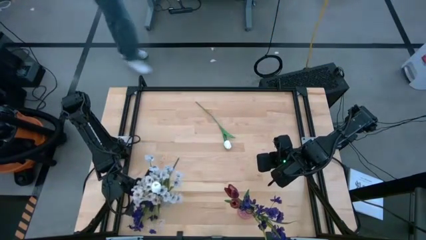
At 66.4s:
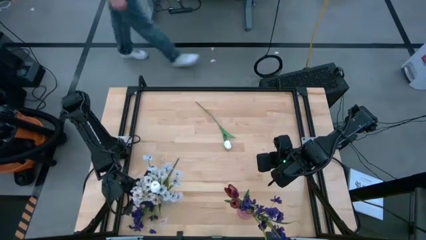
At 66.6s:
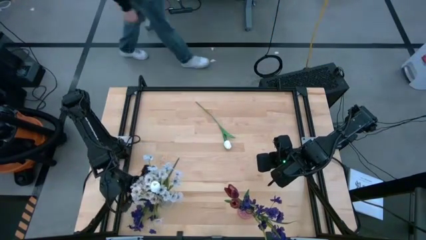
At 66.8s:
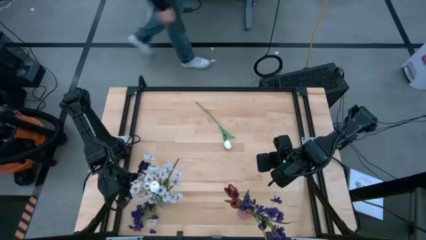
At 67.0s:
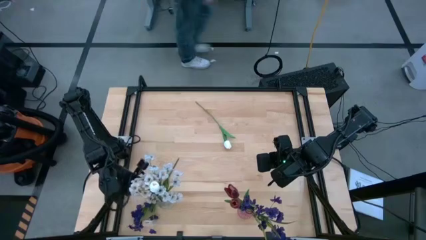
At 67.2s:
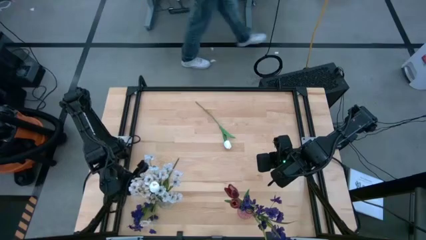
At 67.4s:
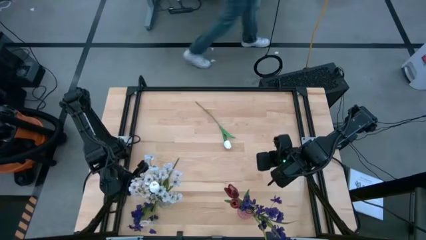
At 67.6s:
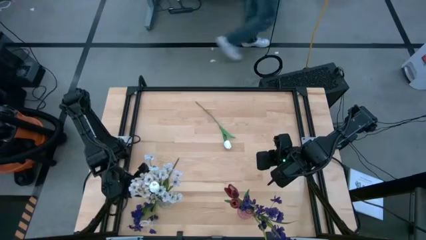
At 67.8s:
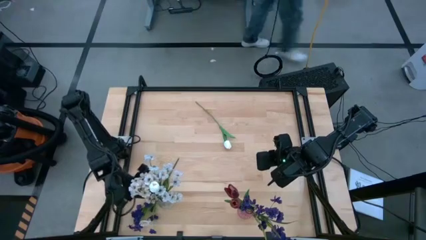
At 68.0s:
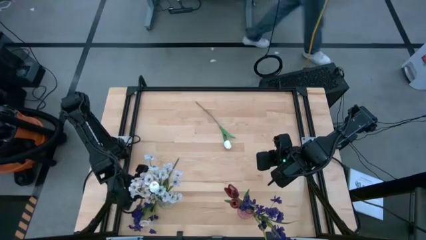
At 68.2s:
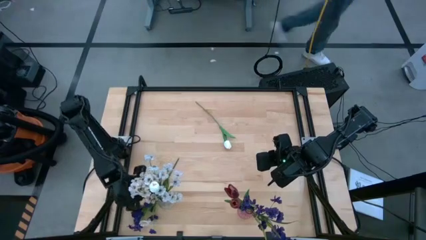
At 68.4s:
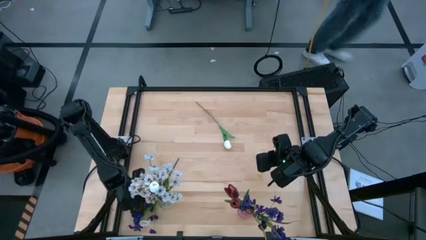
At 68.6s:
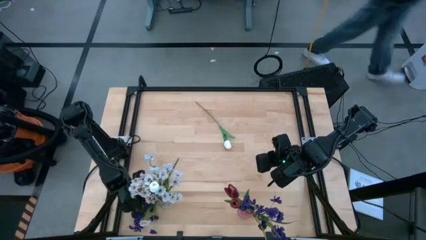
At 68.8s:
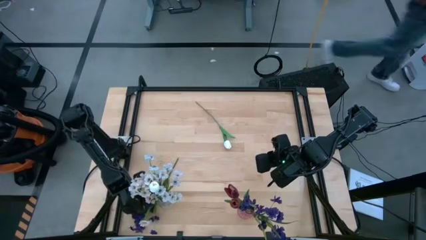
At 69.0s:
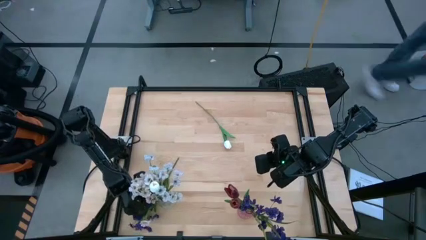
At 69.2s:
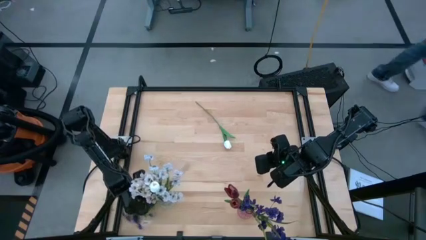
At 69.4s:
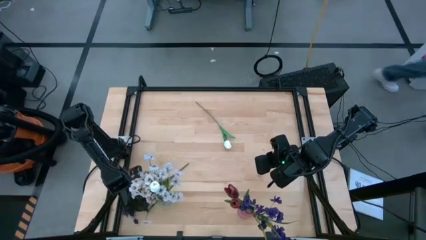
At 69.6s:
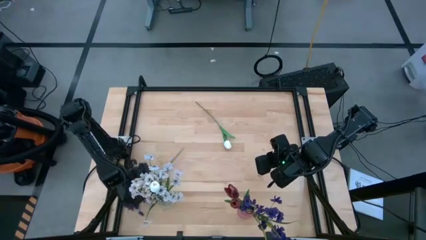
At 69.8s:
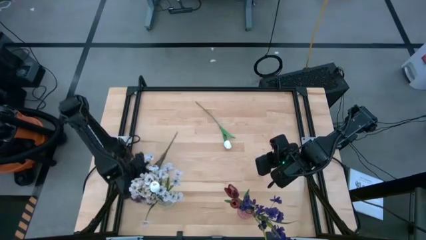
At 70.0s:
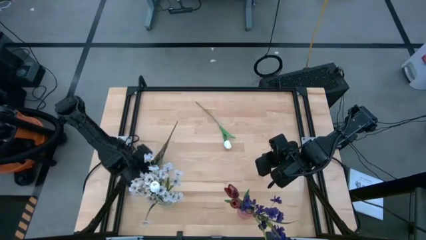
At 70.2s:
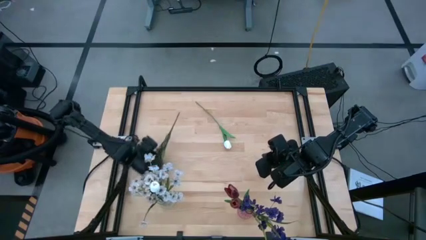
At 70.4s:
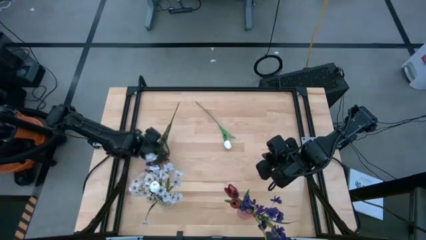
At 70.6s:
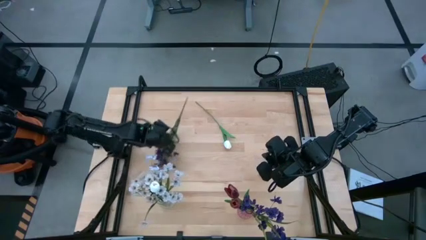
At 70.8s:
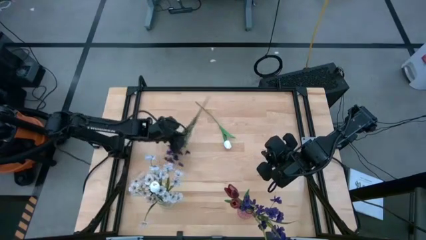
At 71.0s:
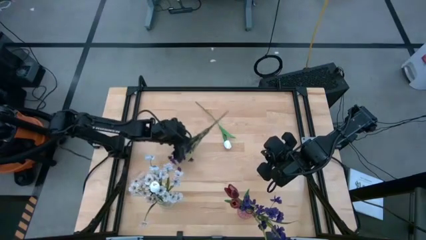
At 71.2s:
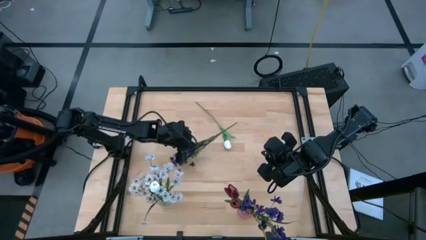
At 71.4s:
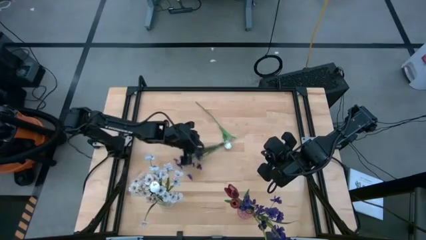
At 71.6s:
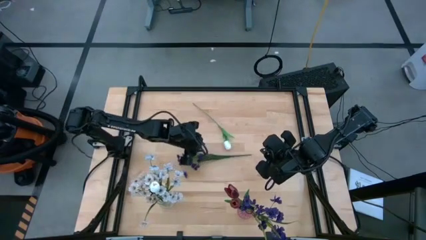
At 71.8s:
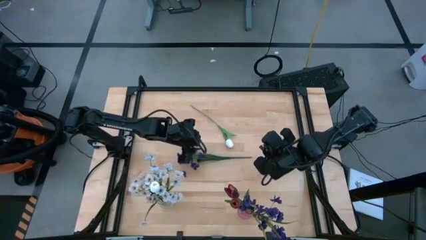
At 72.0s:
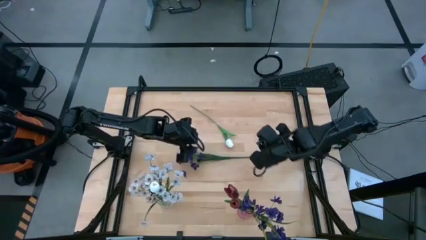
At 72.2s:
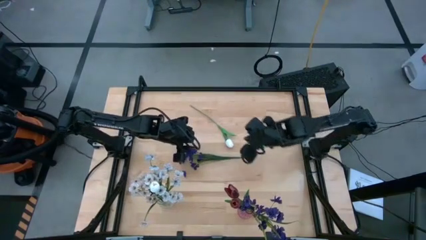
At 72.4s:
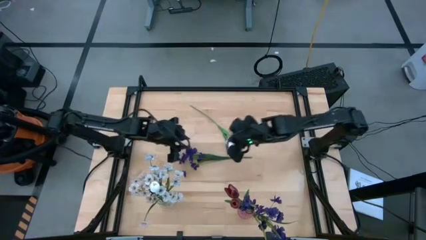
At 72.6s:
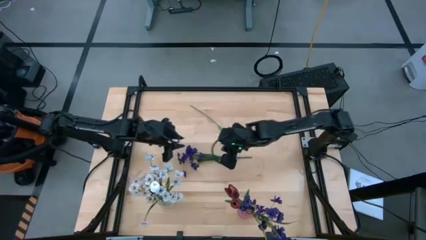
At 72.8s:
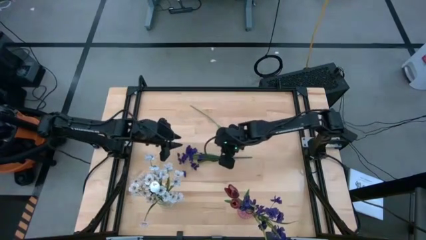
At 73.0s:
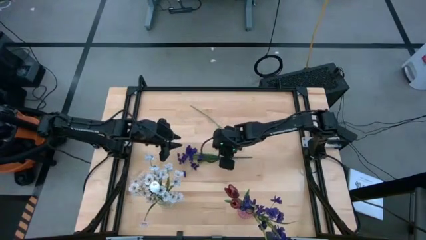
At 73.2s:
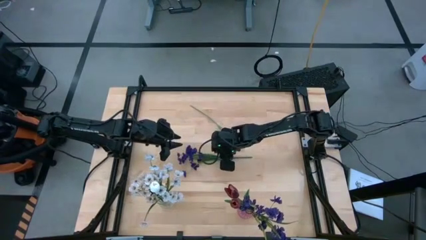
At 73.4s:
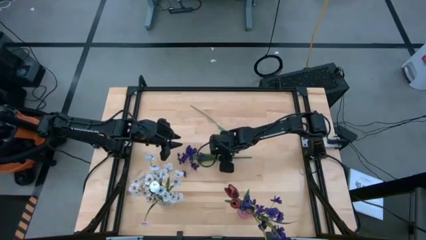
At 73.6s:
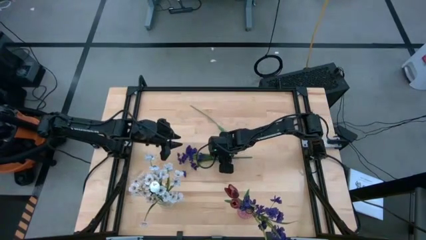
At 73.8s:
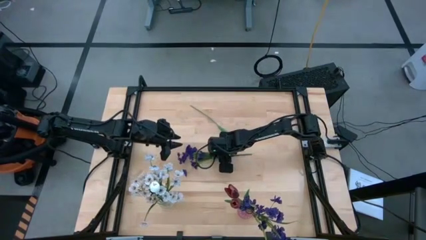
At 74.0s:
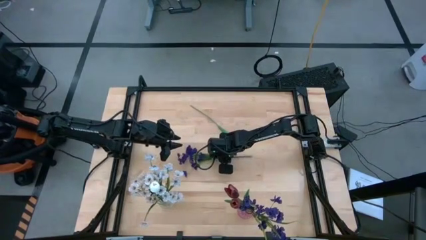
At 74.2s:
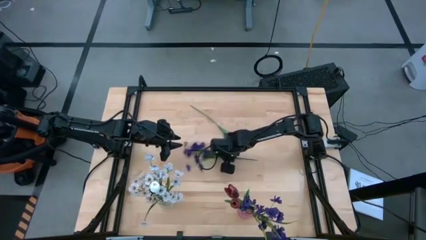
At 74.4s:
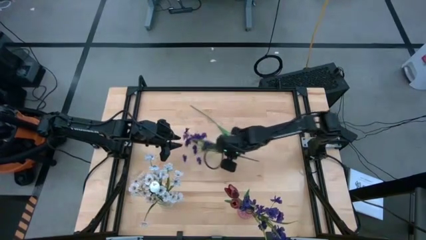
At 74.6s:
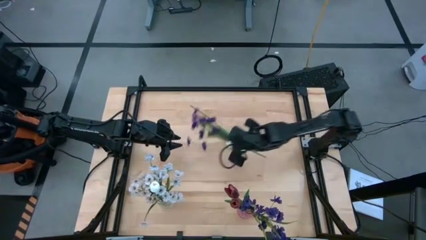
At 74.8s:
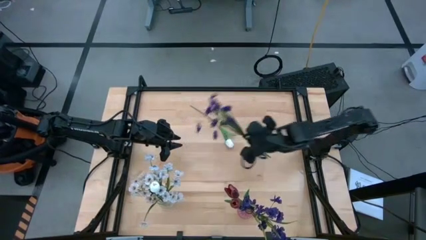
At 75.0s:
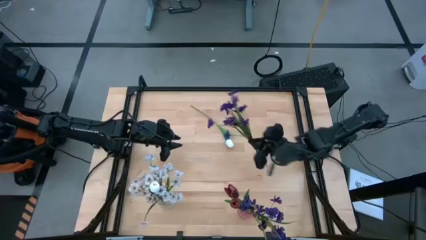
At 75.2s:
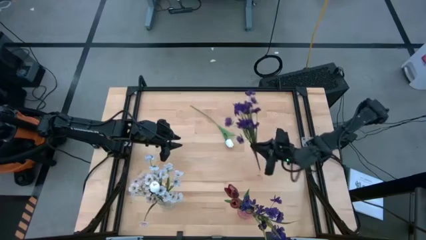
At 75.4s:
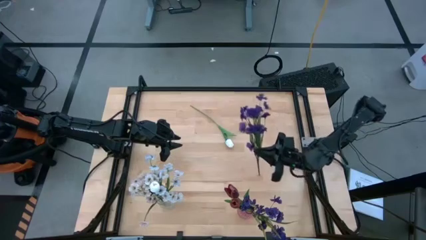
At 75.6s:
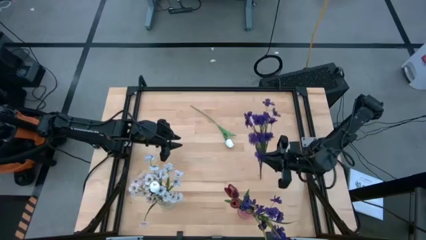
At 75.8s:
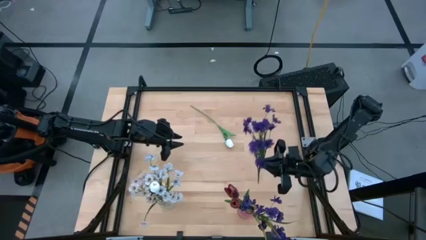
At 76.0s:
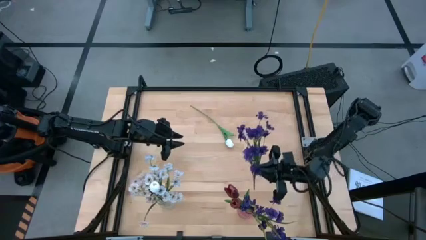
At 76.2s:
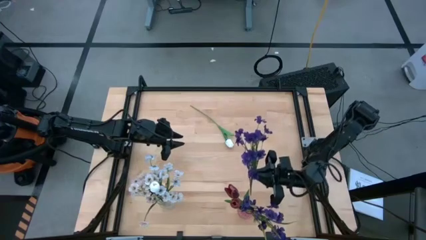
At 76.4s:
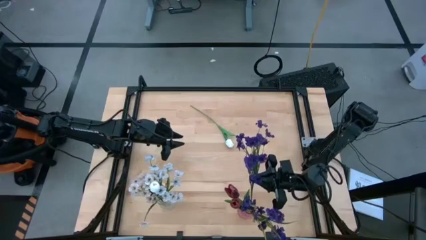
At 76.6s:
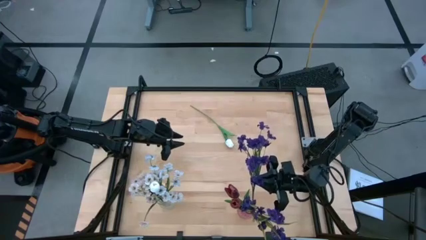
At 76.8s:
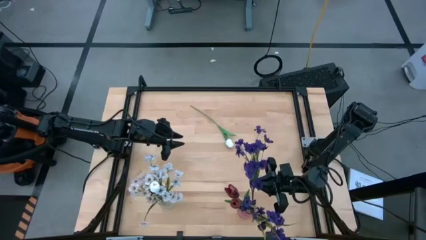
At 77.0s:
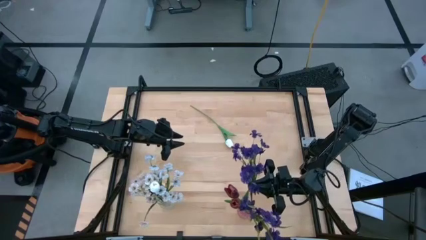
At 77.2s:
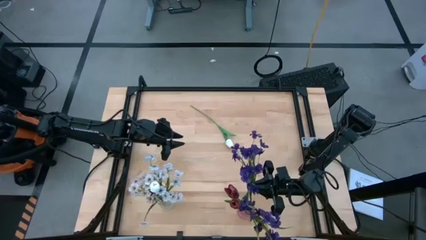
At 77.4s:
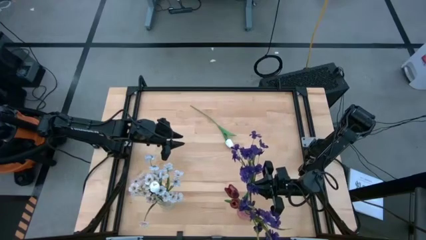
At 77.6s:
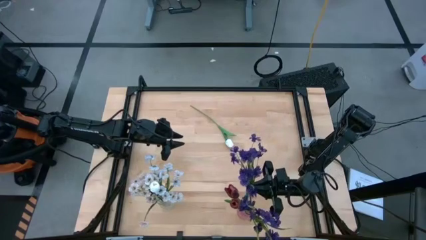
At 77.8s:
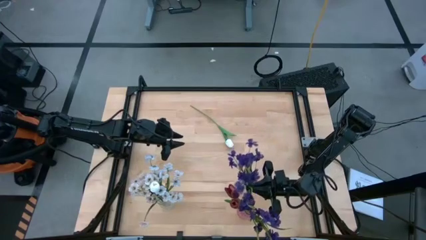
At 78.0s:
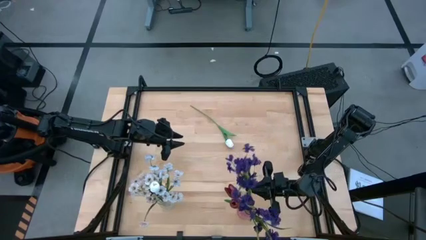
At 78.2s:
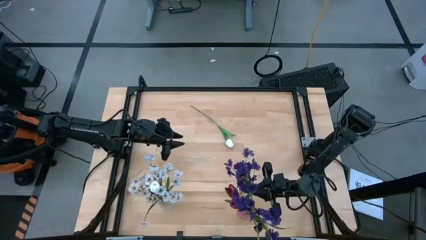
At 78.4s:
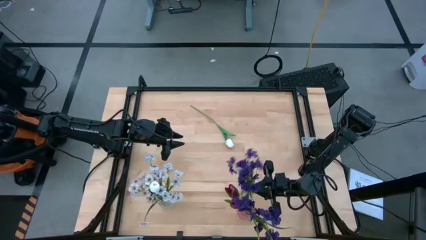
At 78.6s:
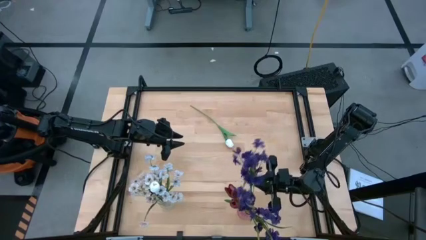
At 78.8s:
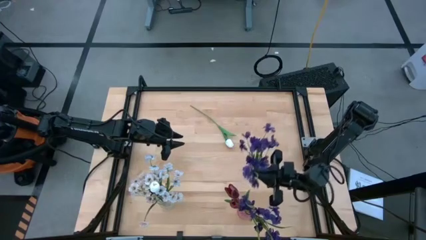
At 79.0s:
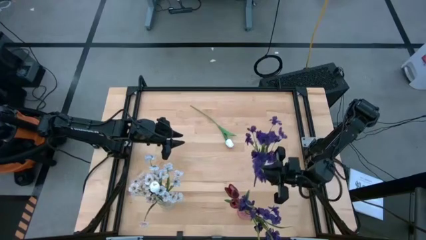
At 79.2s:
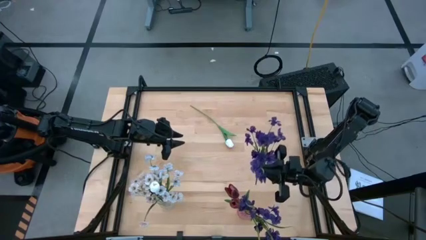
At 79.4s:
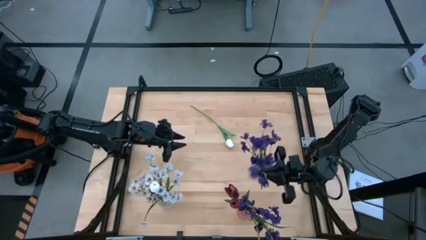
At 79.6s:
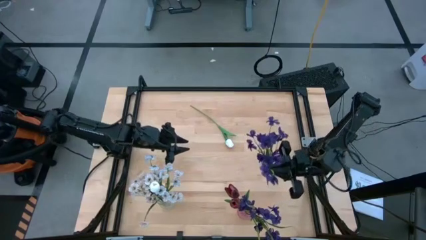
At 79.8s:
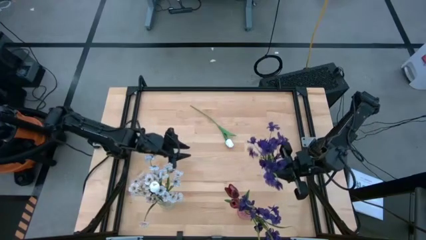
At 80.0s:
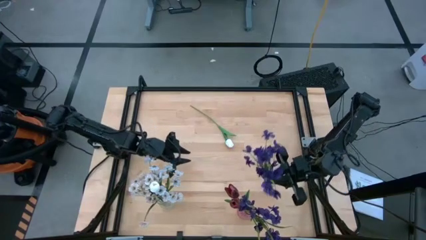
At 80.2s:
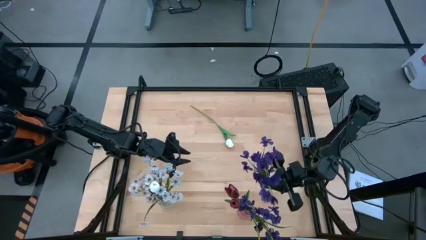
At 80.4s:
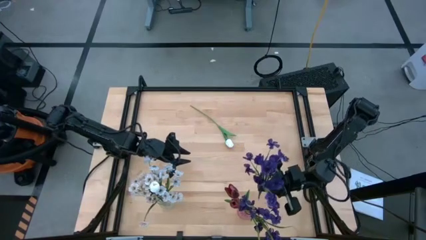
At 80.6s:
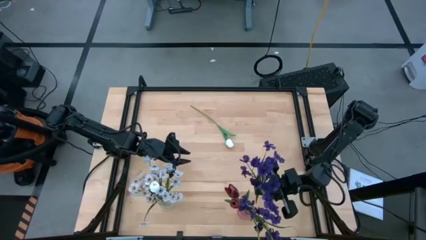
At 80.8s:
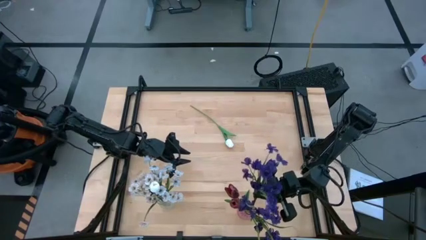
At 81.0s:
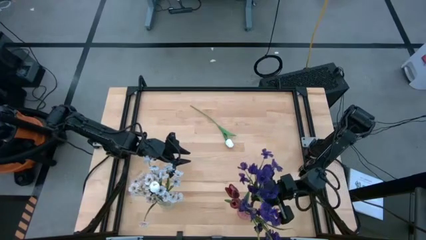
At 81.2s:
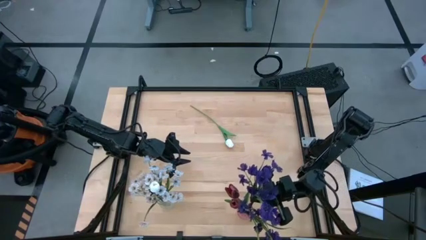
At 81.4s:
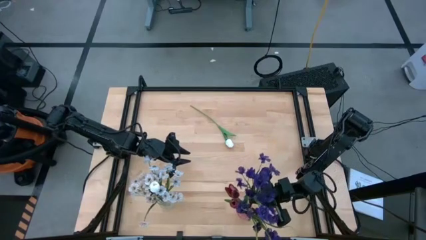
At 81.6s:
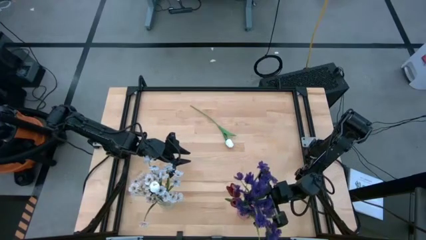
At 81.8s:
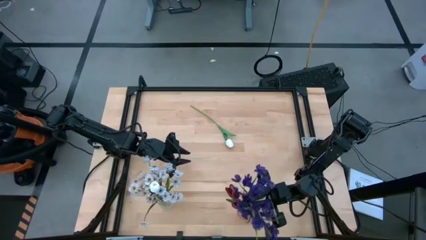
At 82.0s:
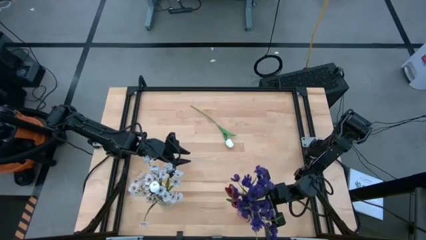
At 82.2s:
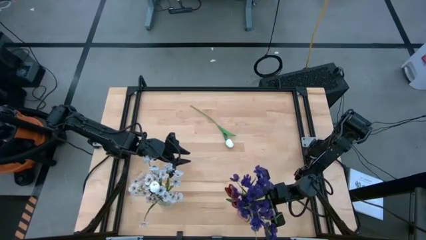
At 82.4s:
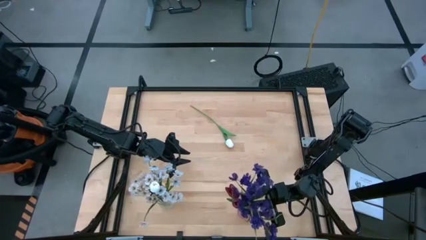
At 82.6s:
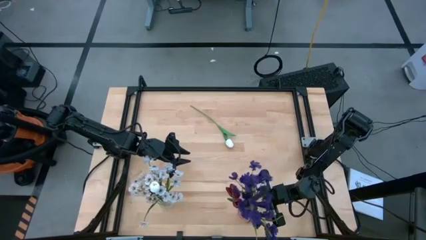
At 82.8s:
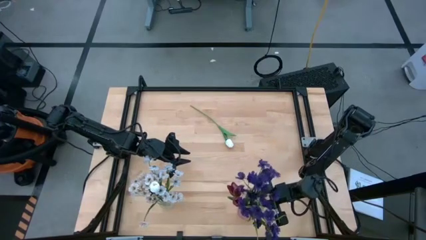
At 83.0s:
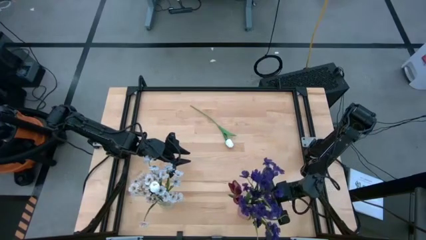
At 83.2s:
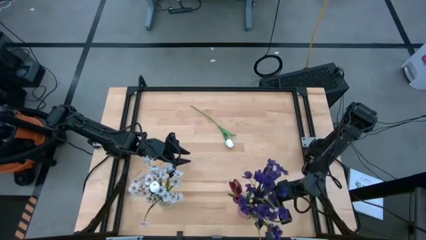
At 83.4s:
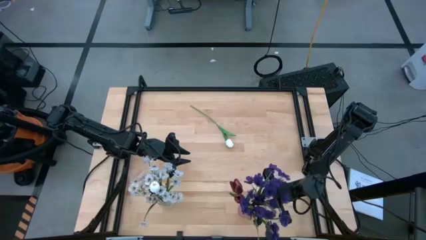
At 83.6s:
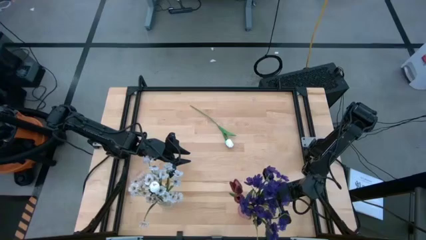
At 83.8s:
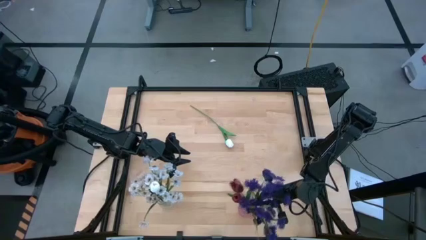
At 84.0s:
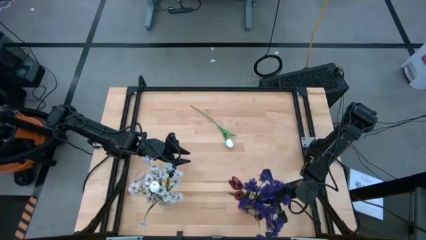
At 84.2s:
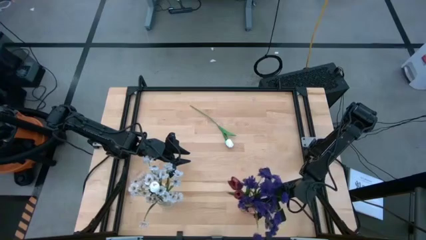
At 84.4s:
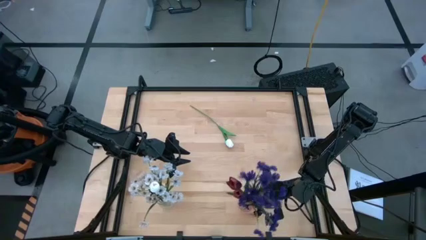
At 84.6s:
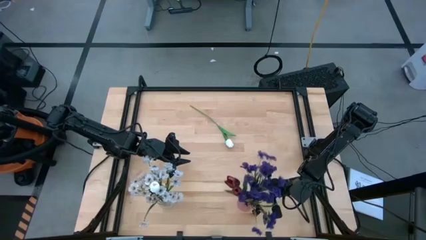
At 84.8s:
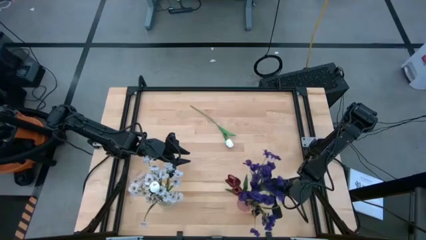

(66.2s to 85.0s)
Task: Sort flowers into vase by color
Put the purple flower into the pink vase
